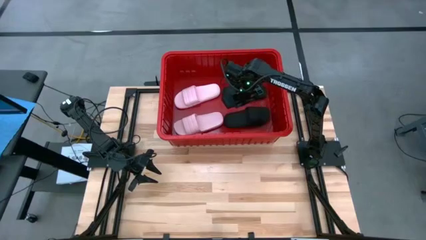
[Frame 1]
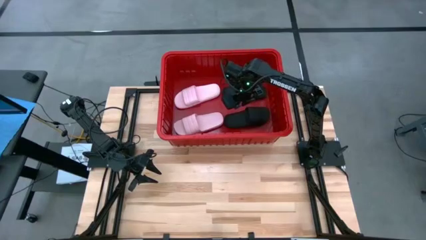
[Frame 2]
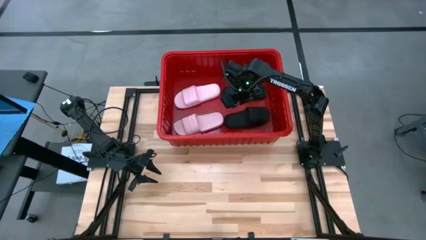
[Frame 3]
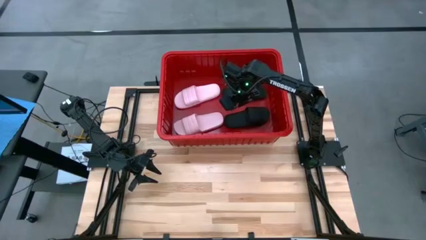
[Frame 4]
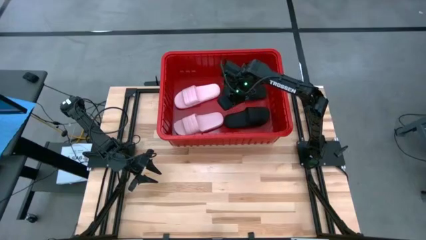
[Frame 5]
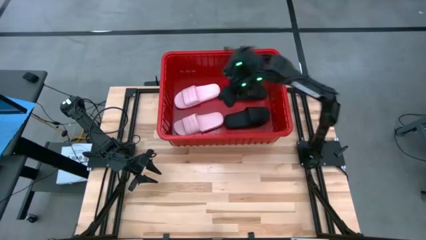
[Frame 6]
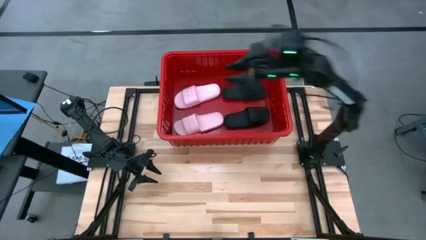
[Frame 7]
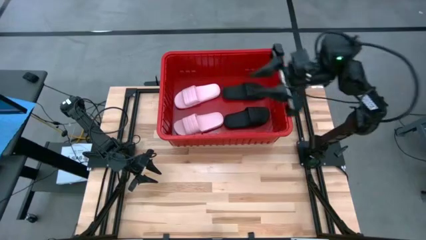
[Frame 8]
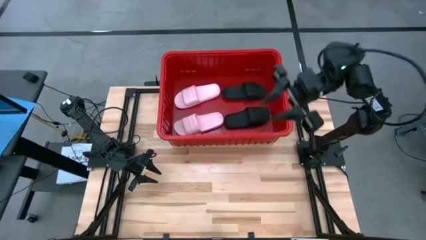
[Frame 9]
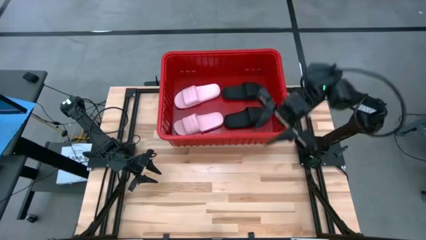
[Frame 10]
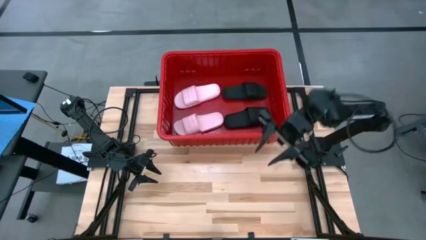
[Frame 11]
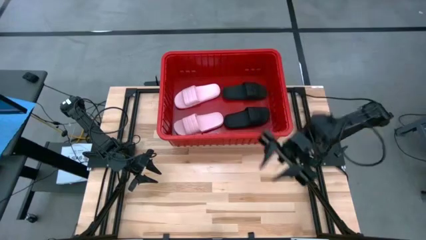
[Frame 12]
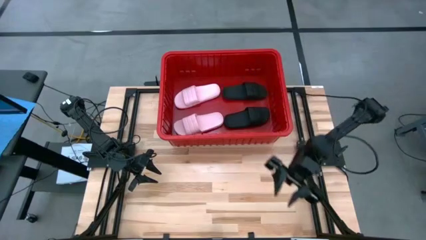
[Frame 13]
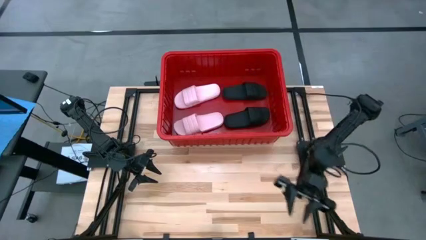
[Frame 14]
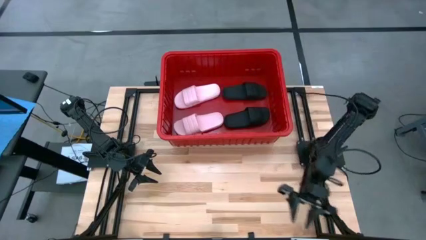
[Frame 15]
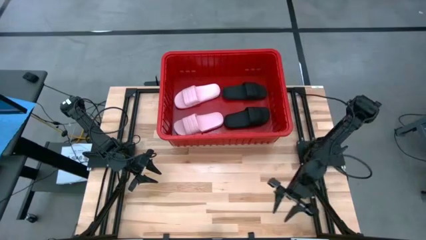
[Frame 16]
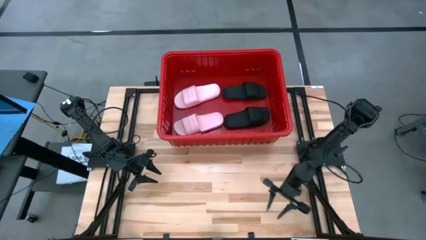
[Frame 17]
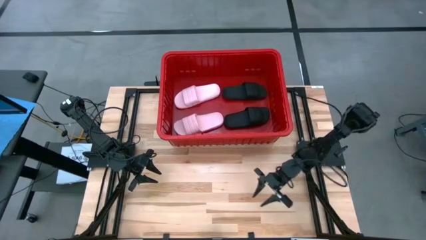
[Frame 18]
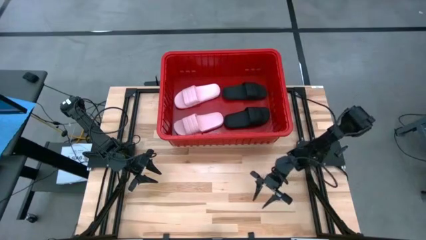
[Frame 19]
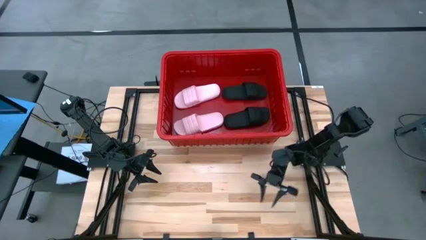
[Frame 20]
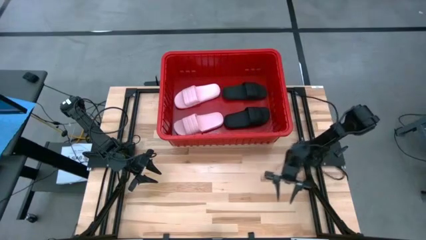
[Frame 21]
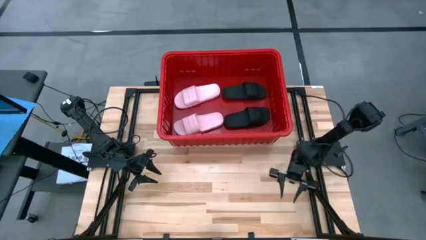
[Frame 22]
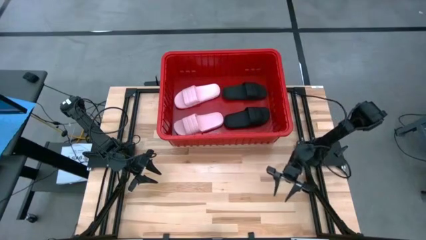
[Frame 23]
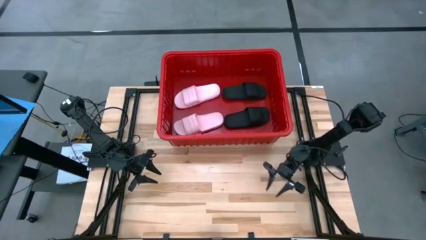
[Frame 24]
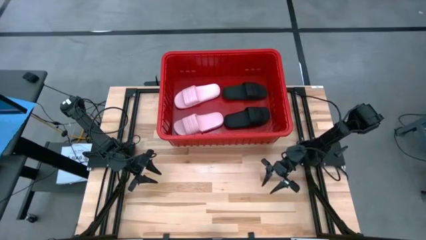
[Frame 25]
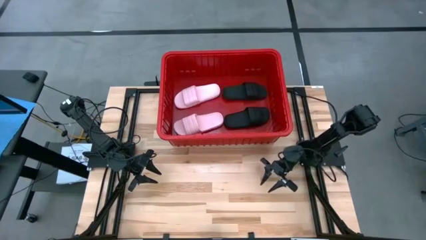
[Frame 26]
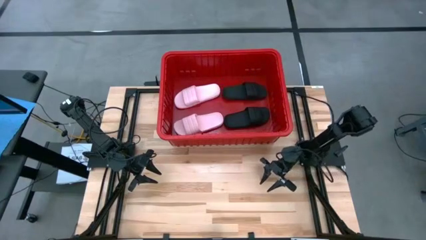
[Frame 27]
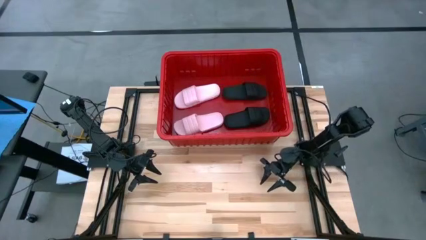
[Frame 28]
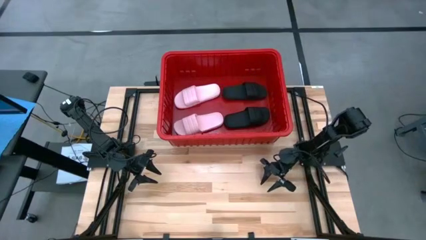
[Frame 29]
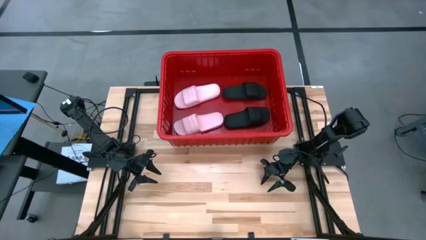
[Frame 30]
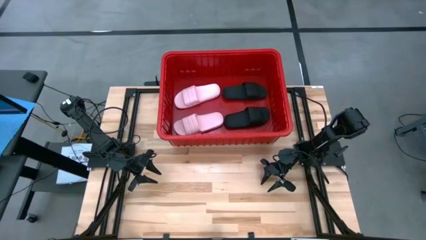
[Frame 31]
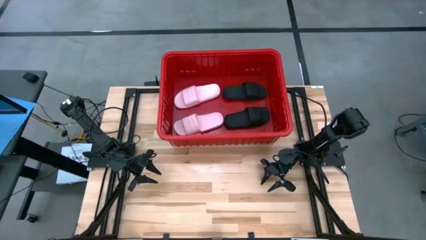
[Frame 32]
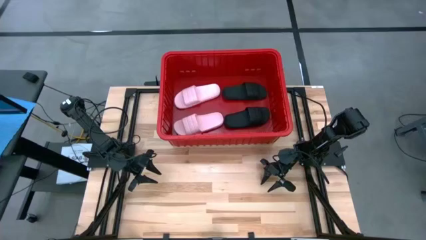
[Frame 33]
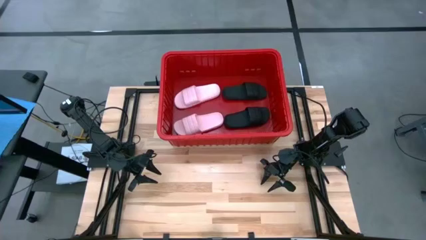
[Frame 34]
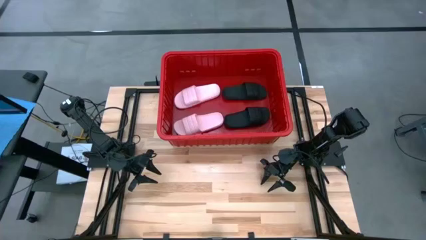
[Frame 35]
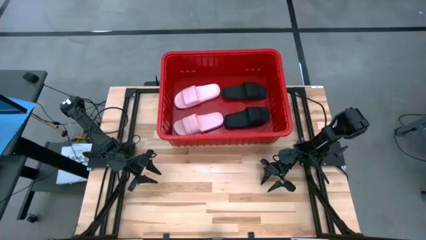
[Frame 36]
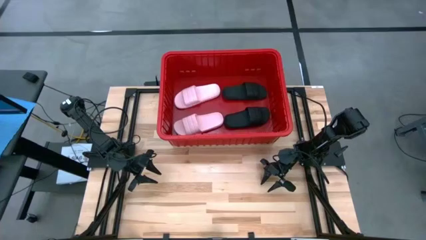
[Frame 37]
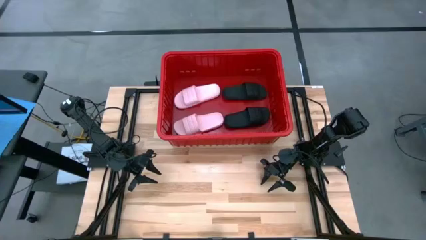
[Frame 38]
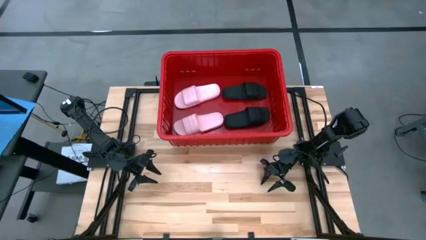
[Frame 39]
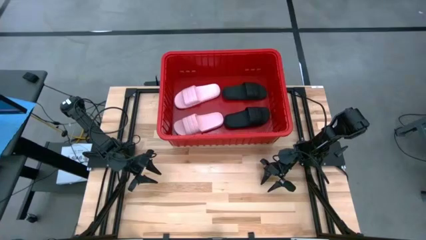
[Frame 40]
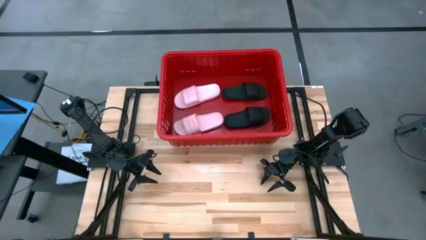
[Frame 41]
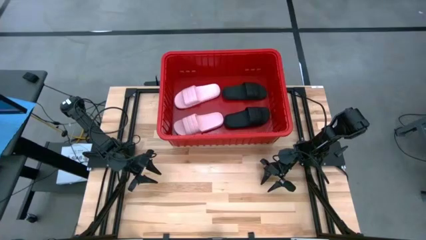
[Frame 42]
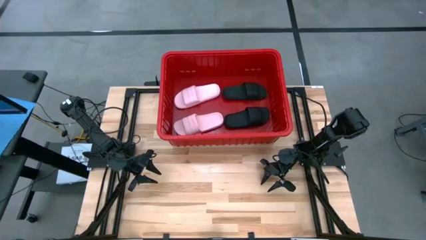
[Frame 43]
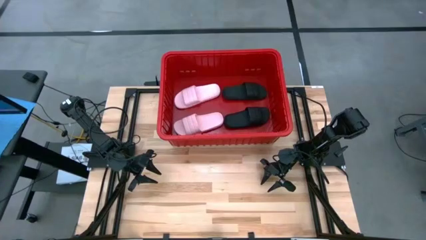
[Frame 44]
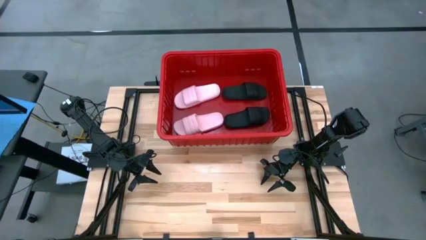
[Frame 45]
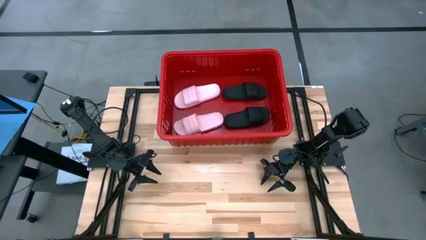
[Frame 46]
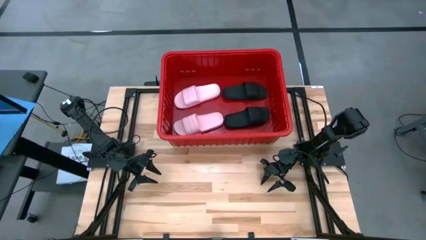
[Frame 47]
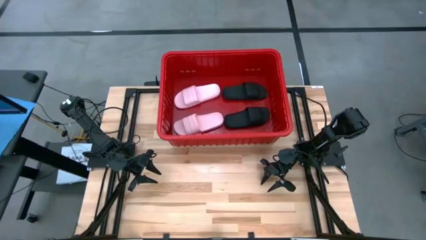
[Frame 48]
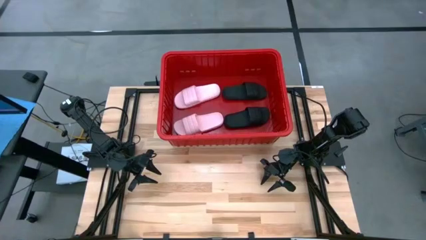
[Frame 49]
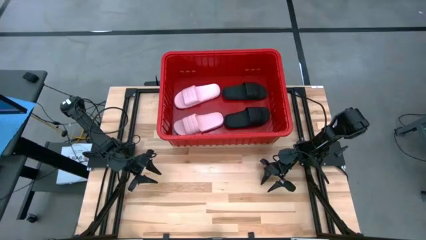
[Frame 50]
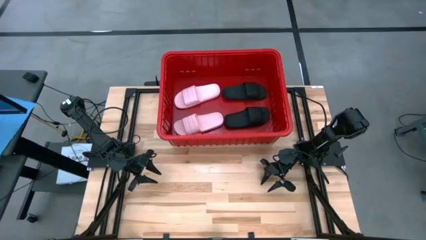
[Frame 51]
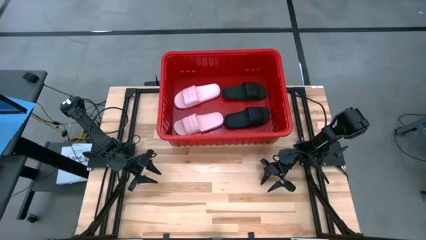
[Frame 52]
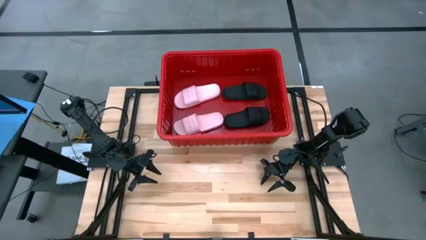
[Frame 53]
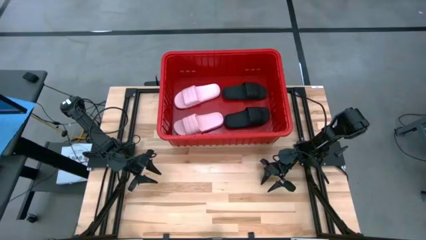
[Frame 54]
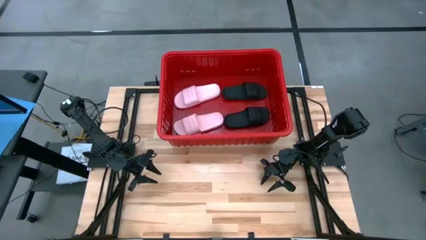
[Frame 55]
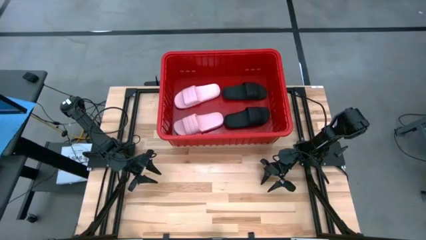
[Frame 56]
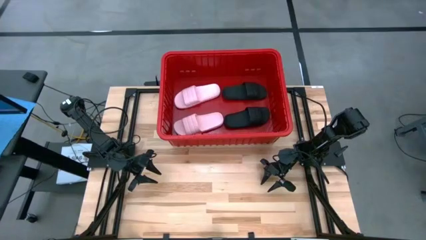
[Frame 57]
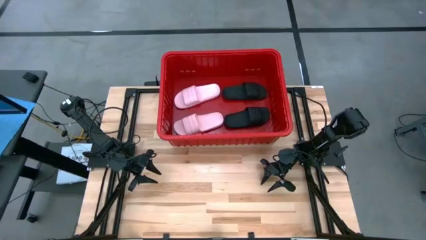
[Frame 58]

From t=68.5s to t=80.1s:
Task: Pick and place slides into bin
Return to Home Position
